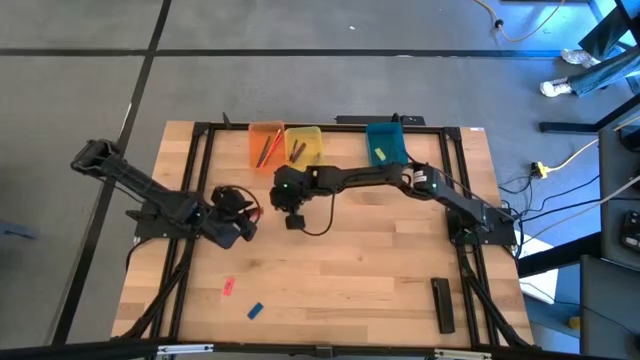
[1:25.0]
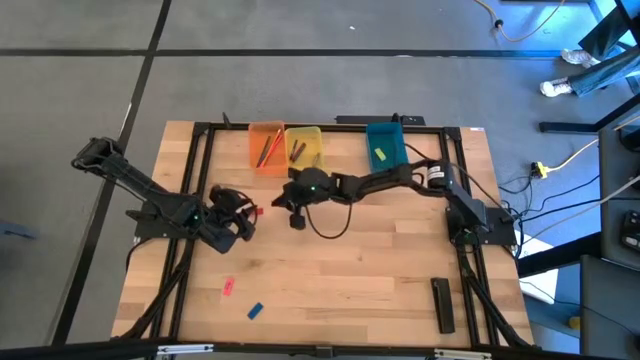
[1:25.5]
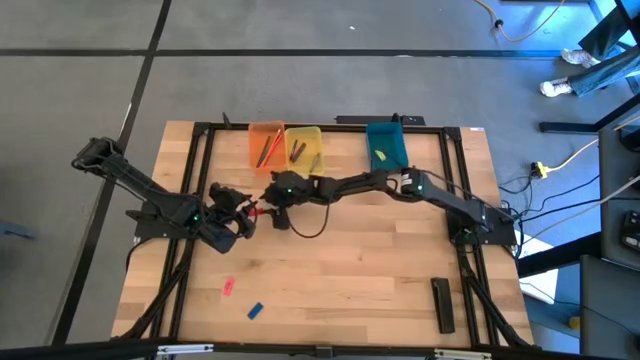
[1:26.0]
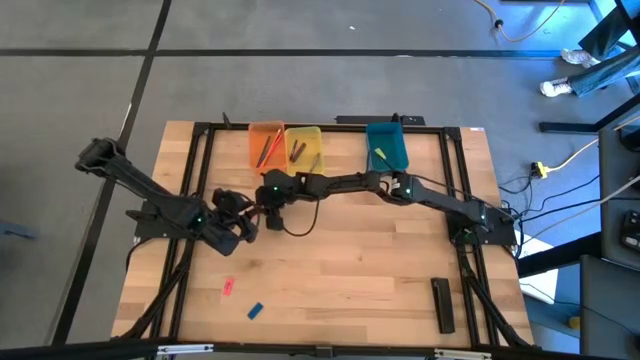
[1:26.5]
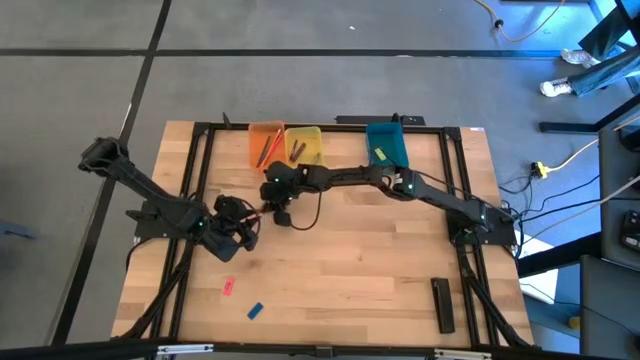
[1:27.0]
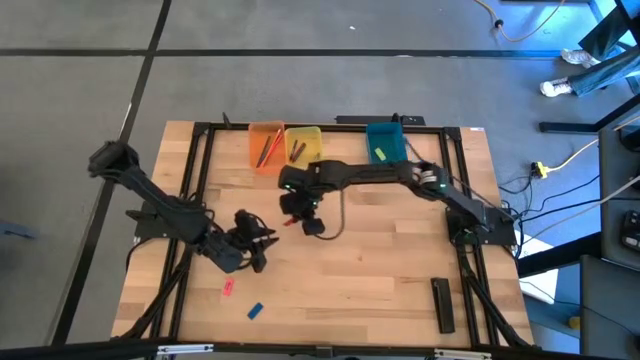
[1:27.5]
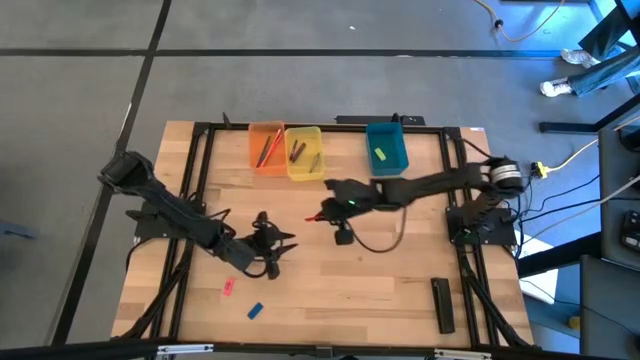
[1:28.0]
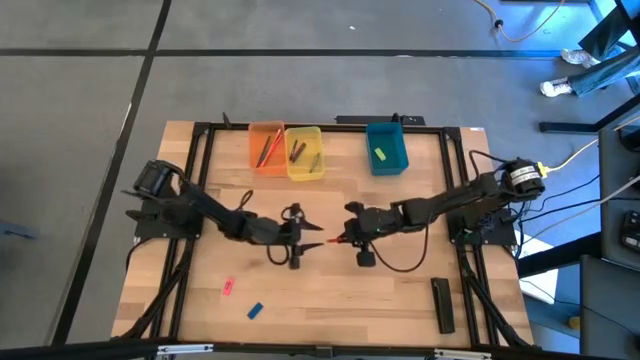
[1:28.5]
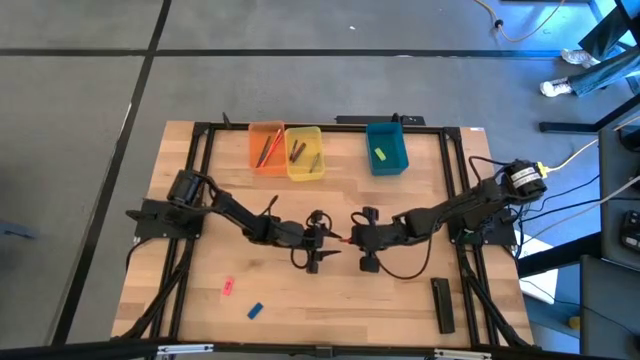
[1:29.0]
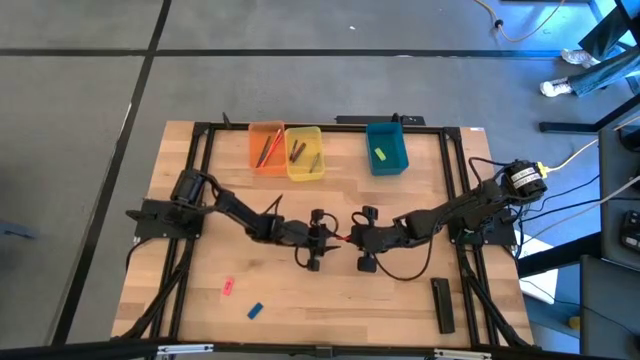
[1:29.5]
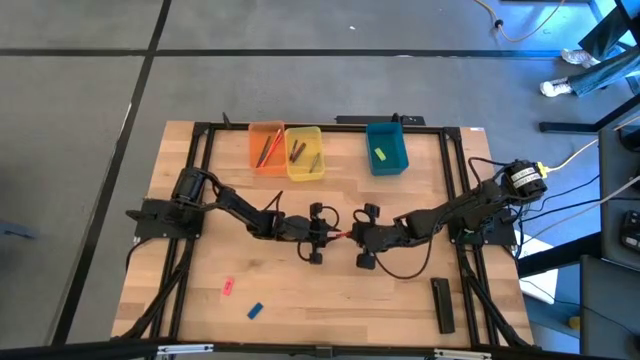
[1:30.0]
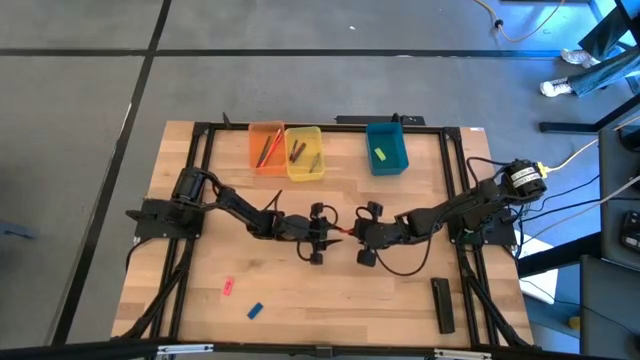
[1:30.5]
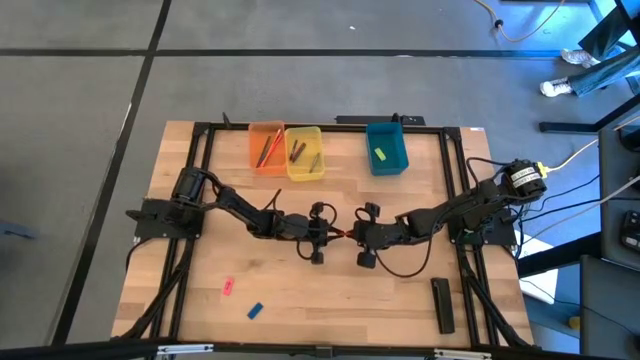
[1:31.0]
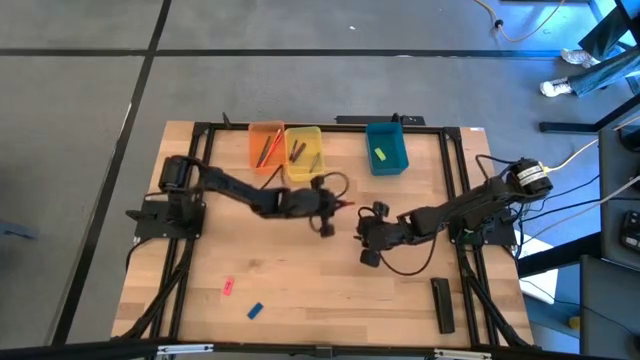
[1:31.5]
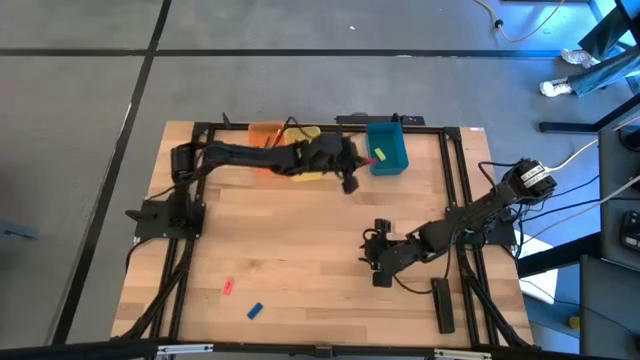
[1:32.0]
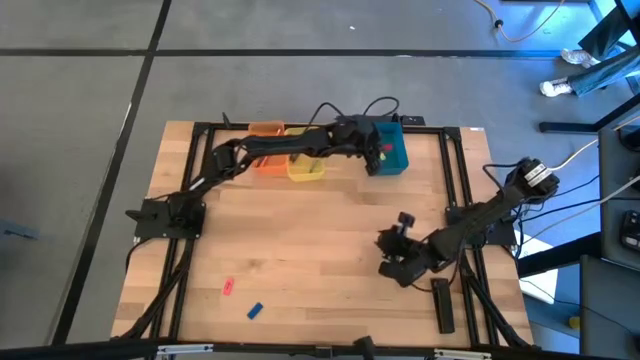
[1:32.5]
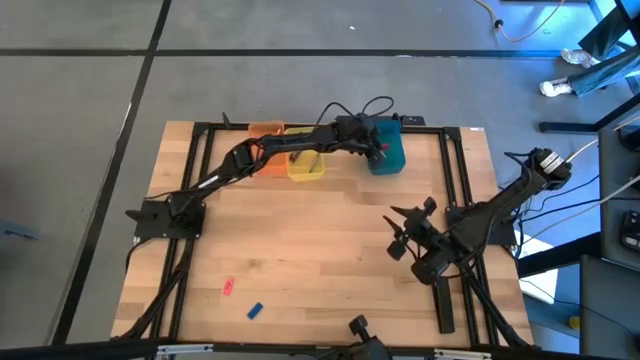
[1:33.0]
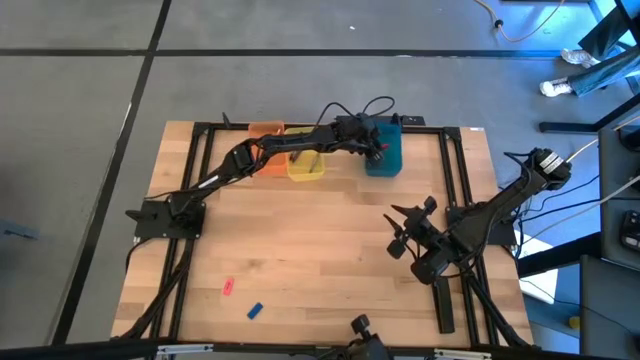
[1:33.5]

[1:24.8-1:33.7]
Task: Sort crayons/erasers/pens/pencils in bins
Put the red eraser into the blue bin

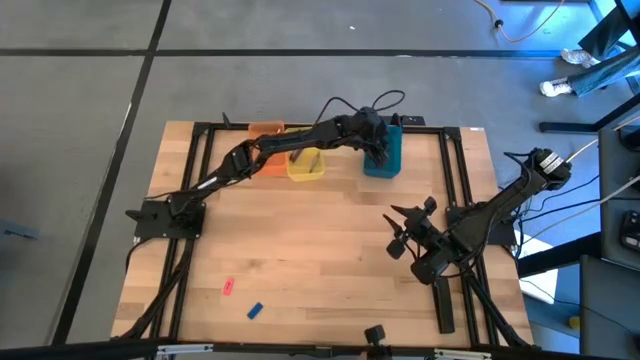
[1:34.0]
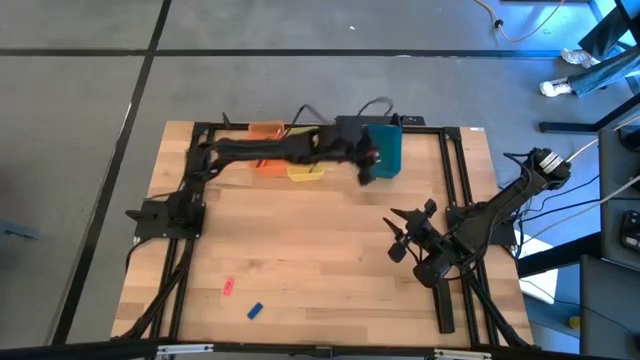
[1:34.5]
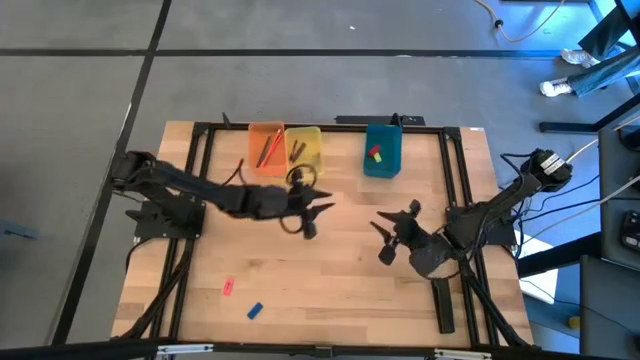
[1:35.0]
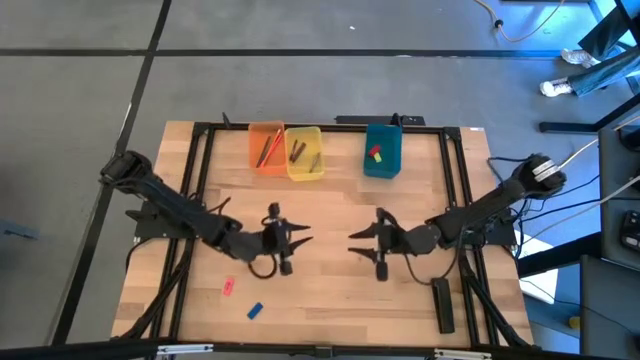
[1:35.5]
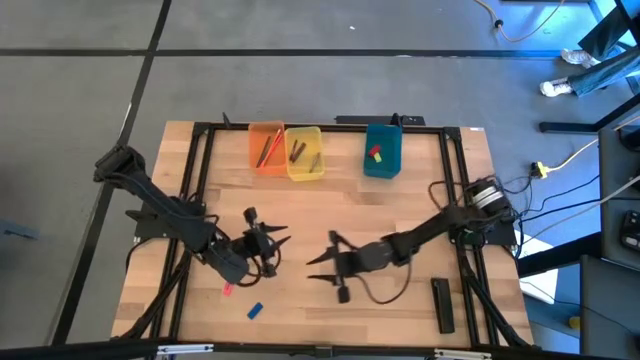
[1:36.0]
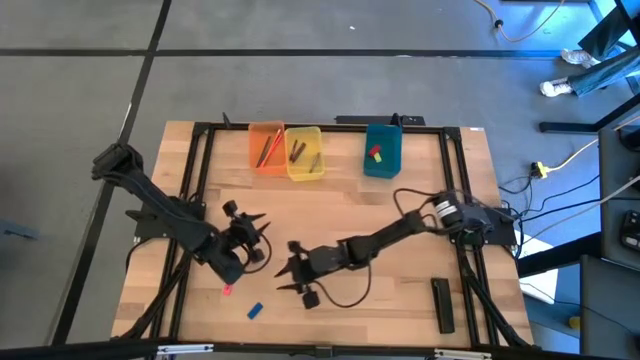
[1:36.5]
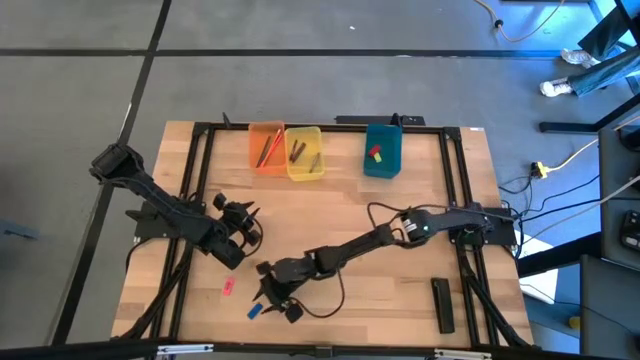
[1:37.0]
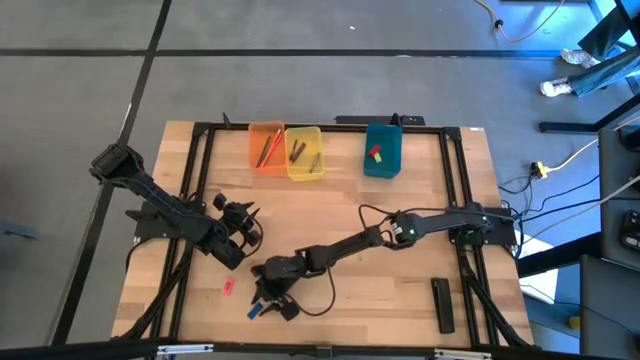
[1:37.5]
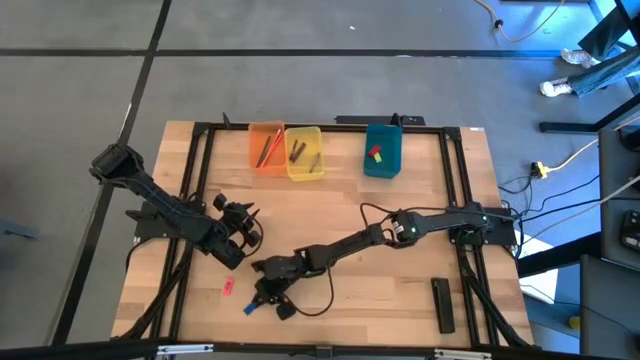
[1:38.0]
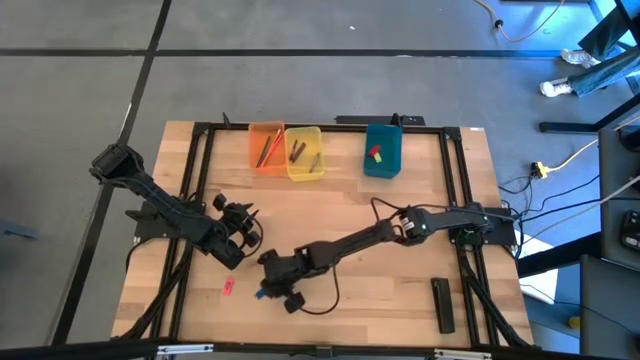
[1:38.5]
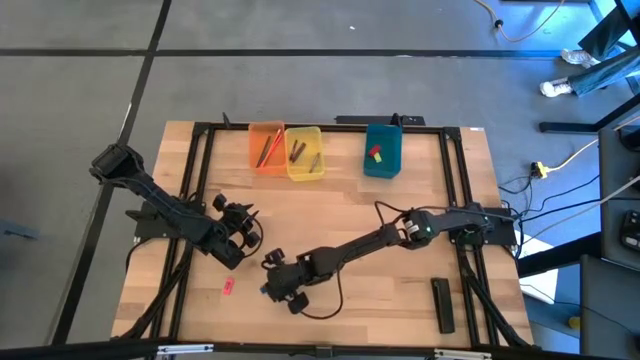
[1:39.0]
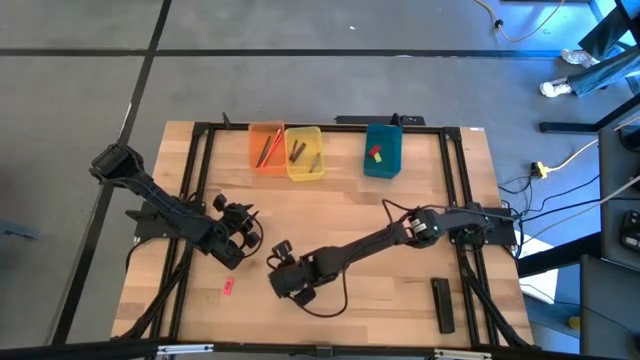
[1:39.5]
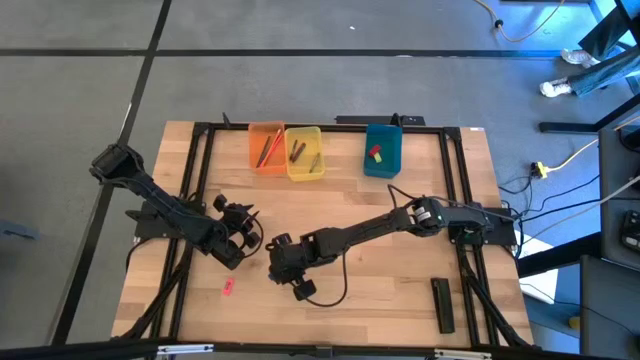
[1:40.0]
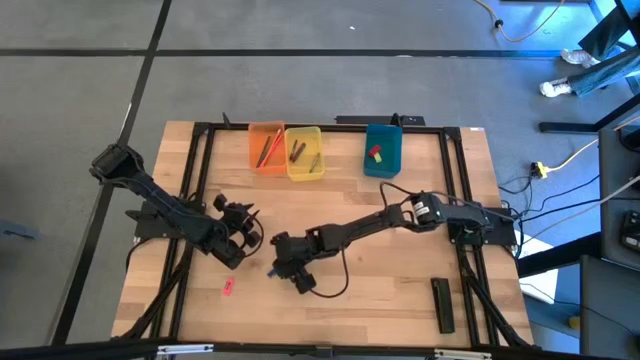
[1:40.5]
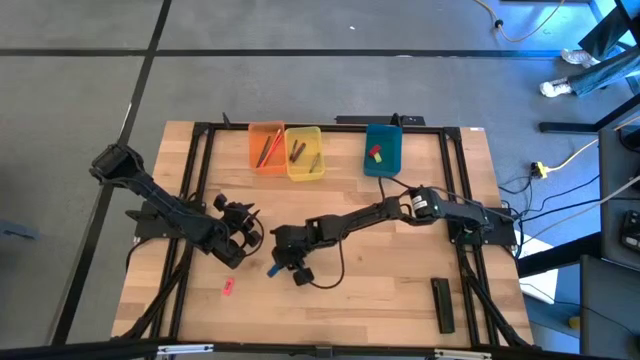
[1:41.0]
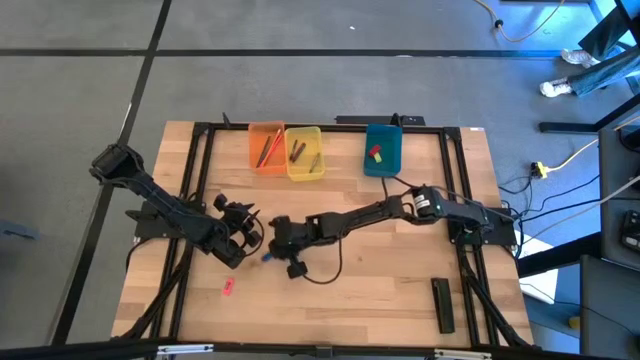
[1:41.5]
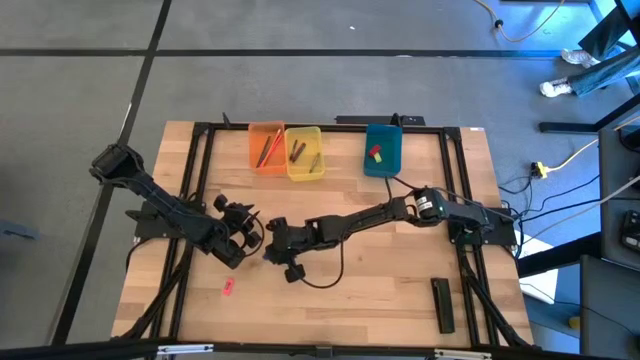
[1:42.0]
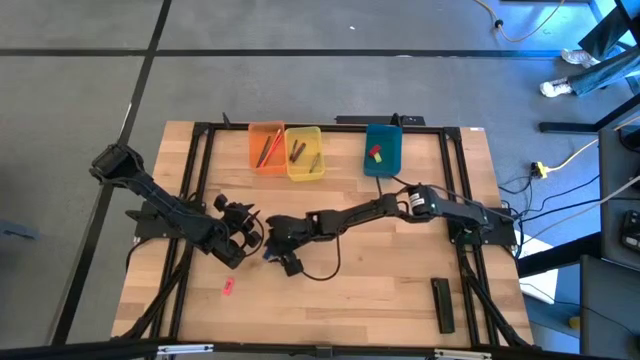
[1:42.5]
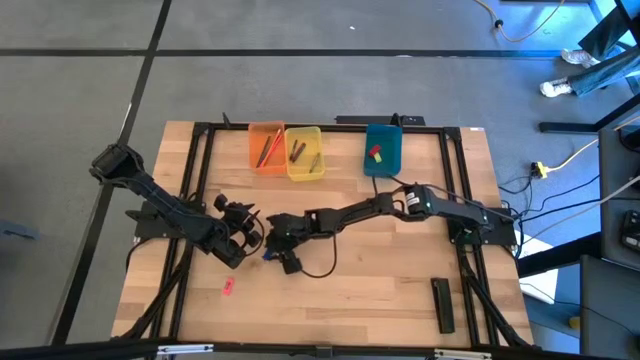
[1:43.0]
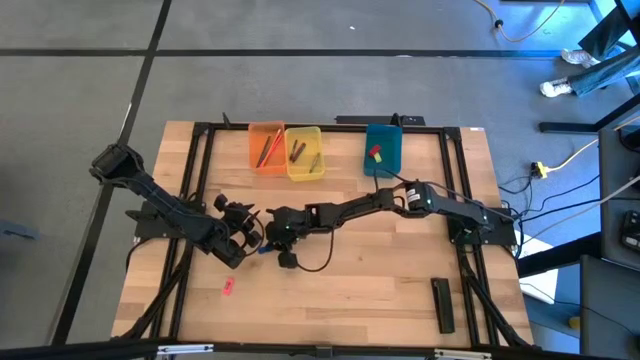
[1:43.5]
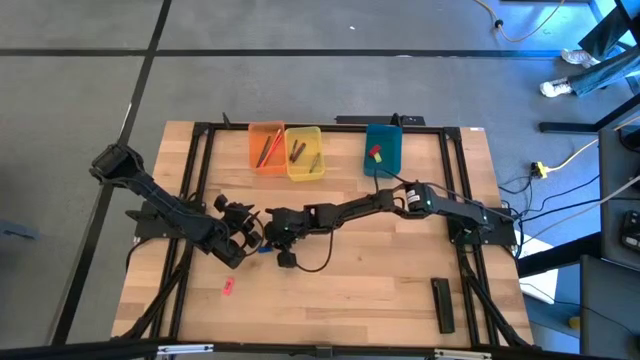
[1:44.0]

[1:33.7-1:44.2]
Put the blue eraser into the blue bin

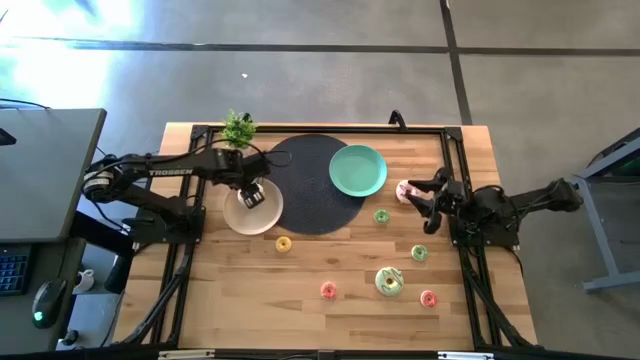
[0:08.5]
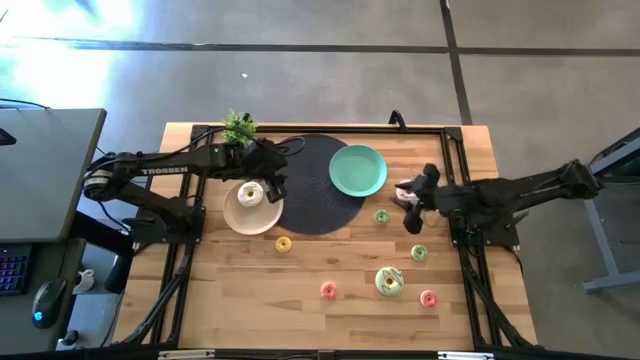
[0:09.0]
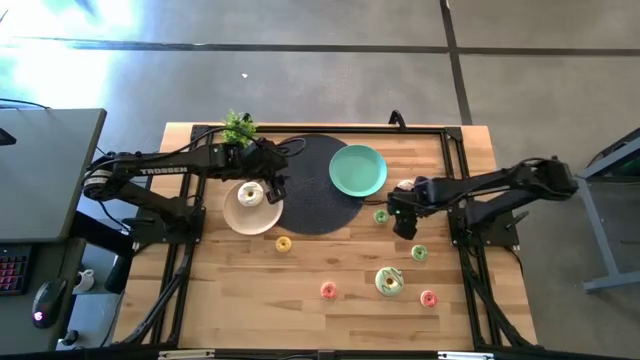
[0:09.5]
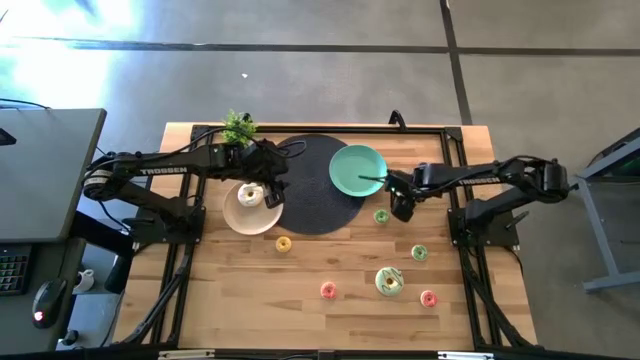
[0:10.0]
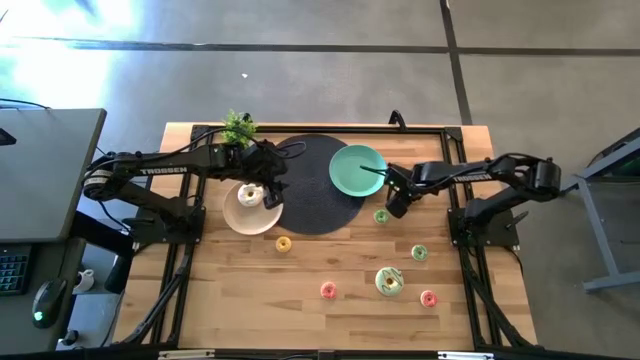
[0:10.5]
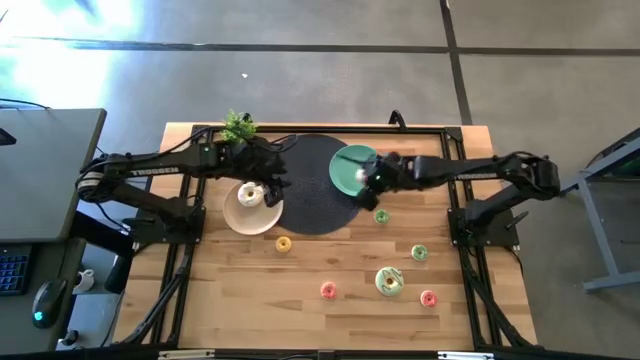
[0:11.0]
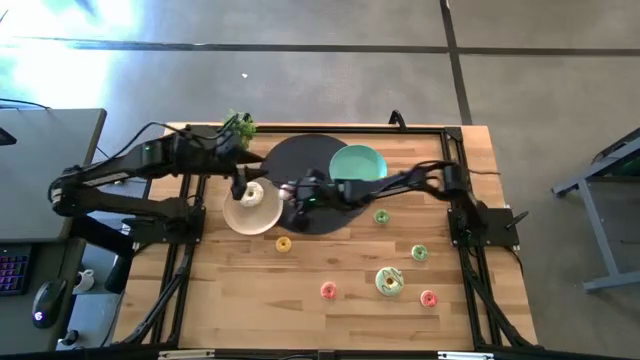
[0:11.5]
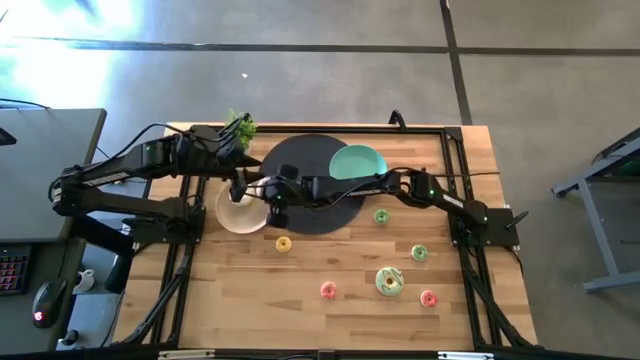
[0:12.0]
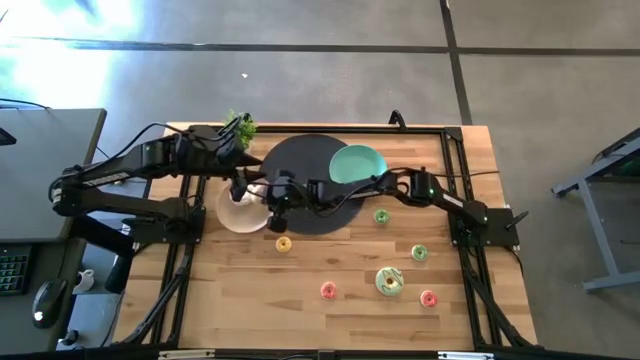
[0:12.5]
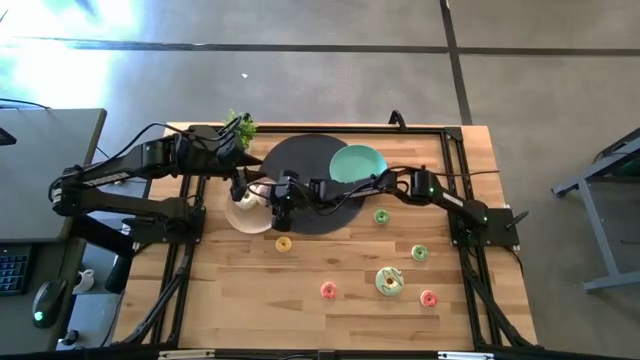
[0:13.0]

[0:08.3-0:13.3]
Task: Pick & Place donuts
Put the large purple donut on the brown plate
